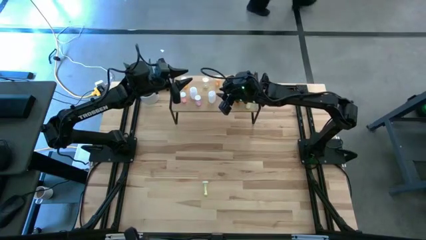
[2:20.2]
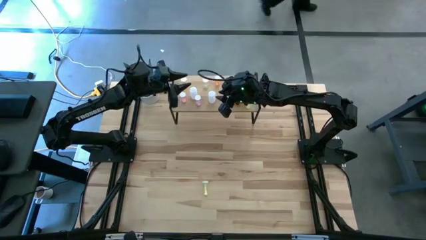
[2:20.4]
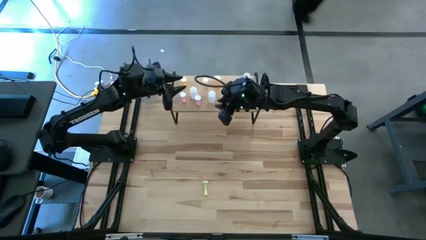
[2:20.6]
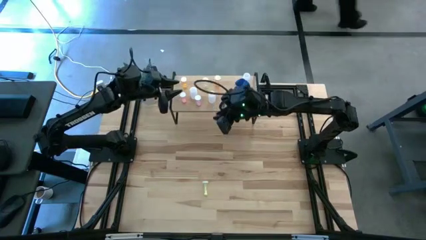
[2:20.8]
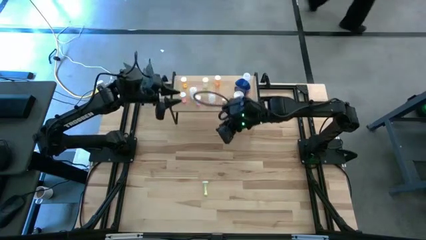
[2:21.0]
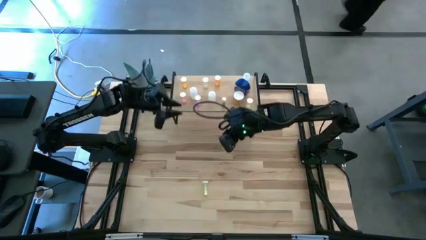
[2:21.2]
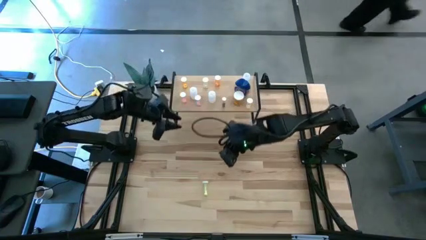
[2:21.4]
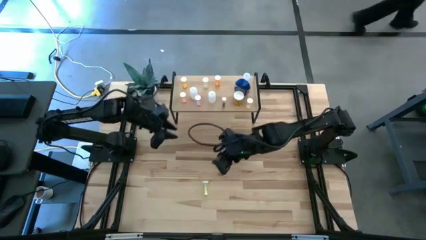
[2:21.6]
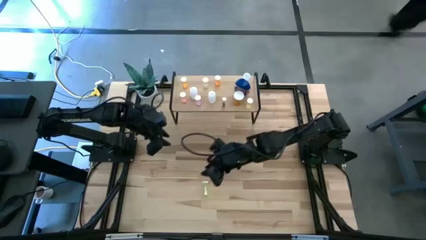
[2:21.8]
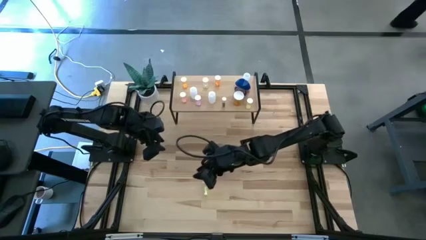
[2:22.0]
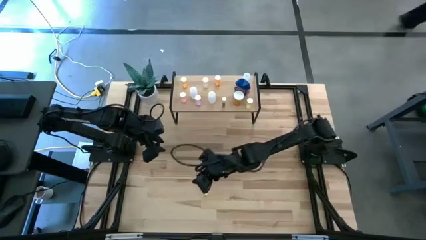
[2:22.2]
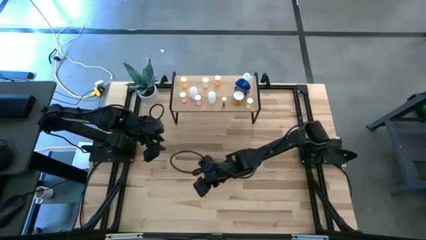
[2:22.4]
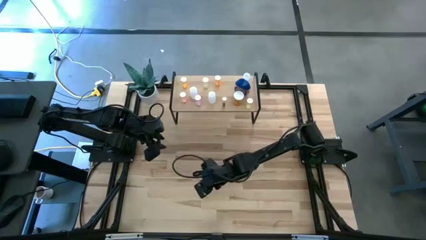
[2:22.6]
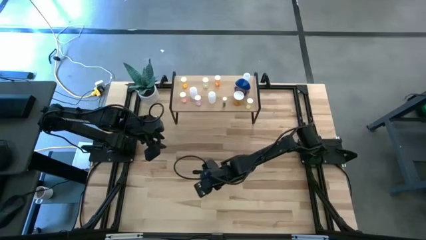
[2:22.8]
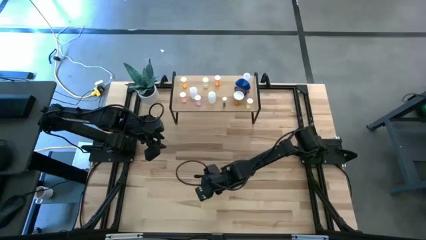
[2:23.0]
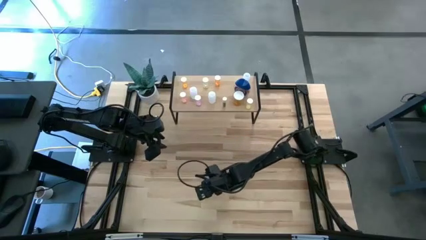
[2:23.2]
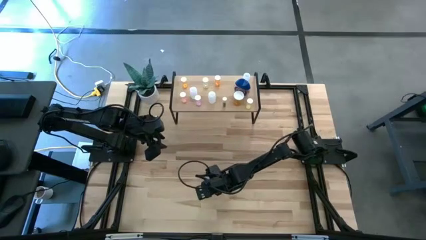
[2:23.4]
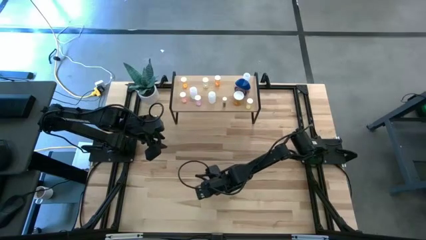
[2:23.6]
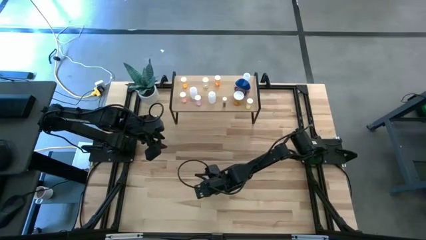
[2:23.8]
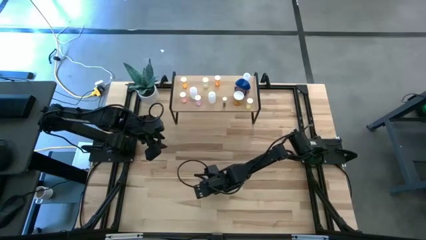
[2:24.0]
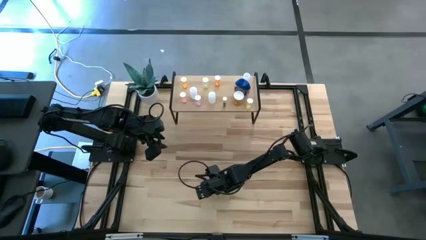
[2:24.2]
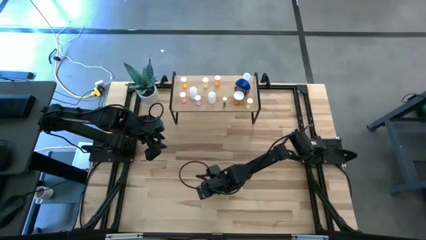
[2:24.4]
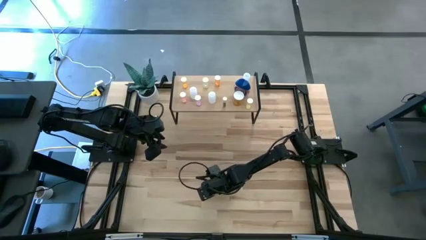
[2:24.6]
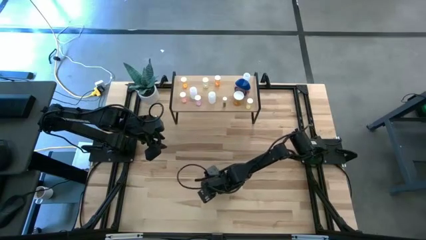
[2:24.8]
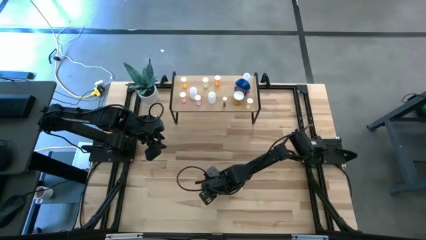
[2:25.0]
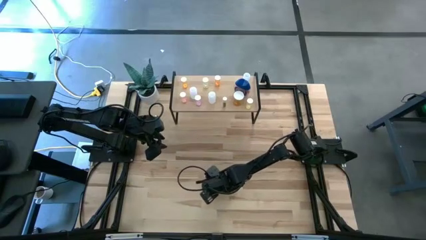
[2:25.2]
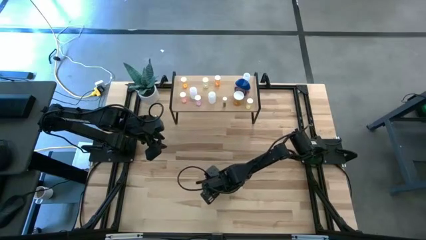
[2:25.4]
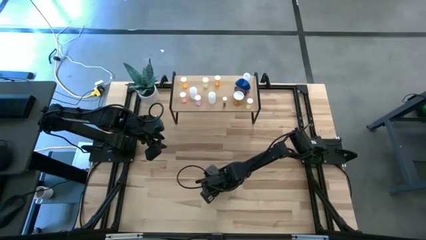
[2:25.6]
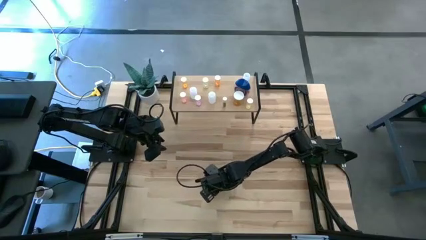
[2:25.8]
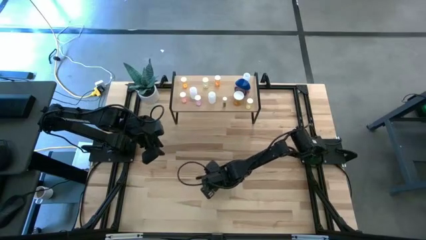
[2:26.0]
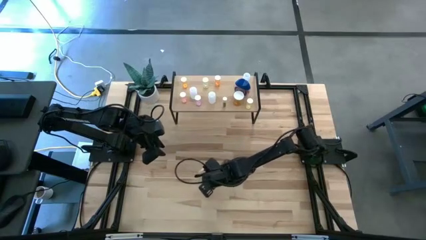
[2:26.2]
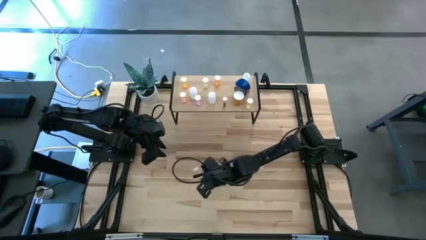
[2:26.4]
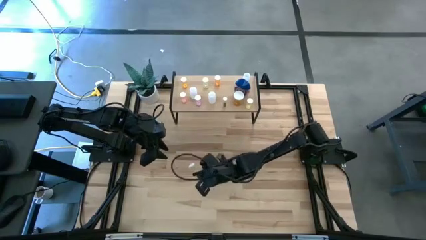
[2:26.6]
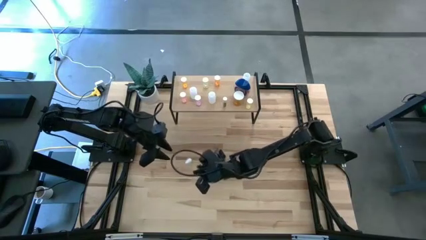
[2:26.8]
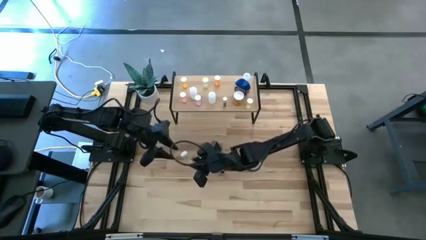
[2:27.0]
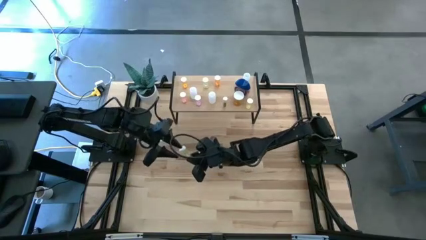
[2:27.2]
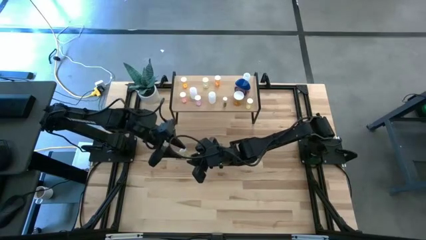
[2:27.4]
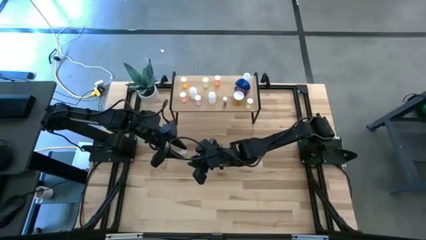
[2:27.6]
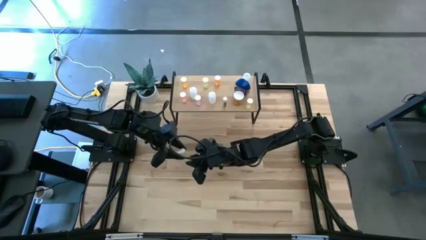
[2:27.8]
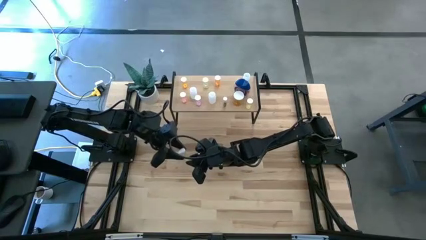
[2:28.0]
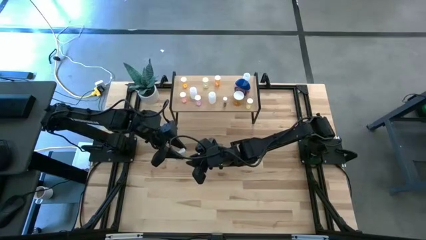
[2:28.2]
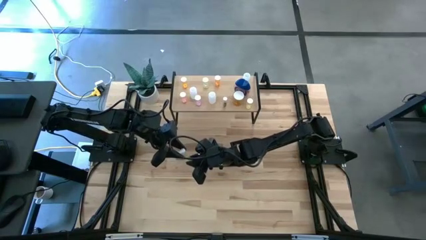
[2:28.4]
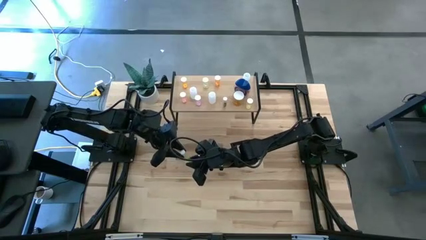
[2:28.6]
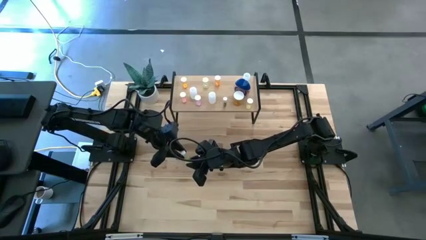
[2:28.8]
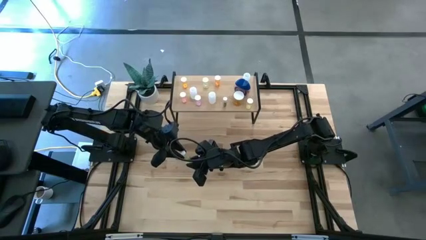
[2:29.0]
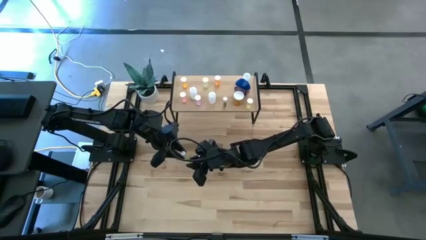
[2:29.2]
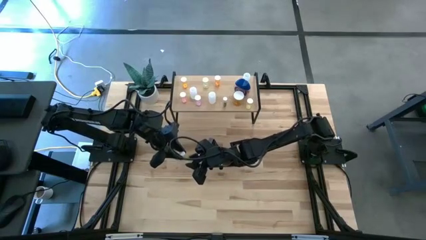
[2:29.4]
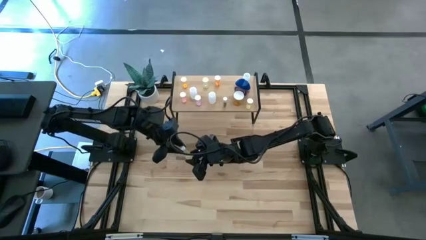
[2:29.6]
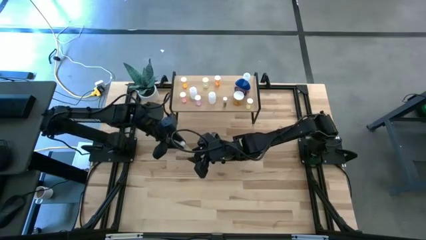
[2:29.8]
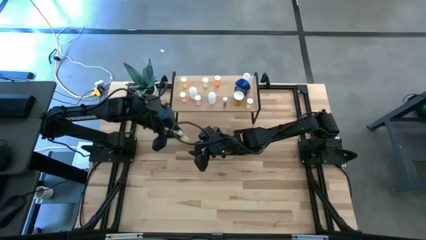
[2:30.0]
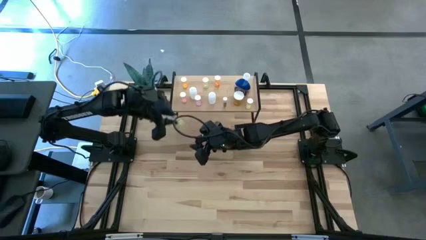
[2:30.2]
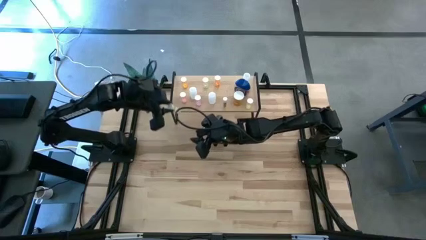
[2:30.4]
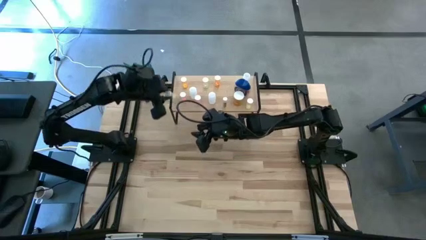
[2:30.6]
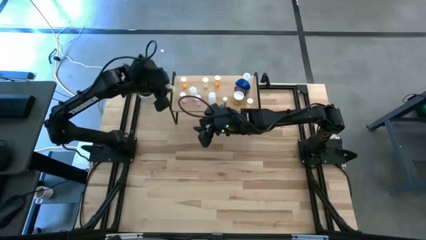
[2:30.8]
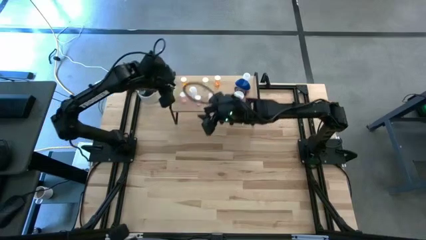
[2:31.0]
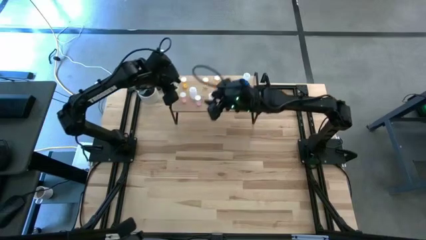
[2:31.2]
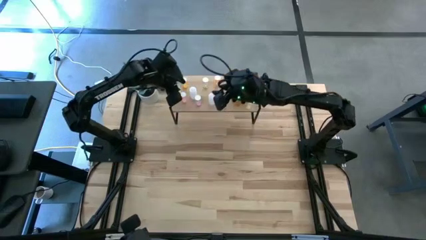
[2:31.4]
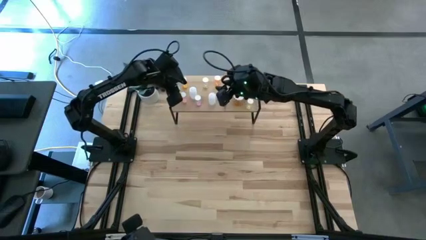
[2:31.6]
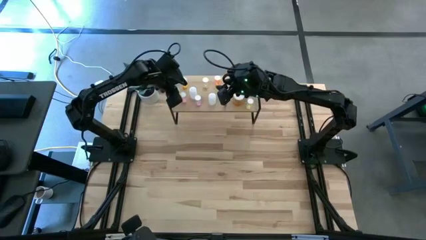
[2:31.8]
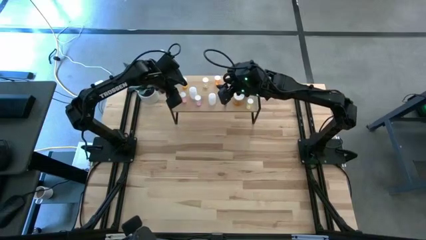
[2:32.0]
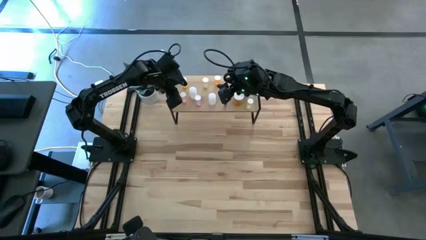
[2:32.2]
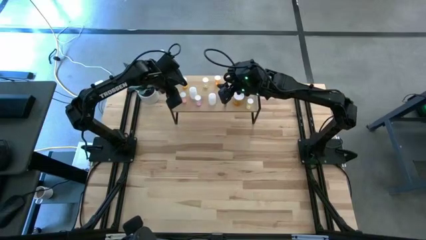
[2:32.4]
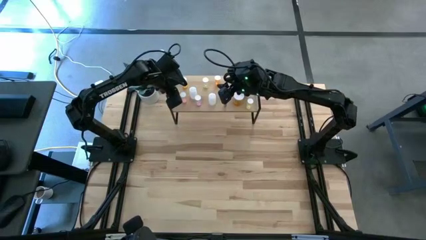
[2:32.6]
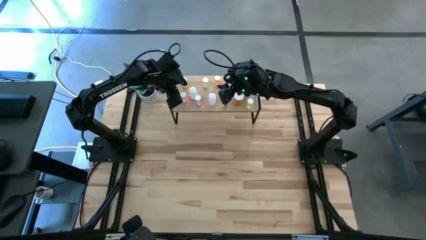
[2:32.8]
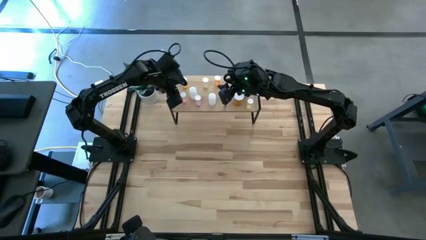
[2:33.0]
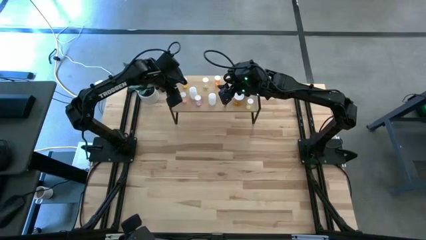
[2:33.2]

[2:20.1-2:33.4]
Task: Pick and place medicine bottles onto shelf by color
Put the yellow pill bottle on the shelf

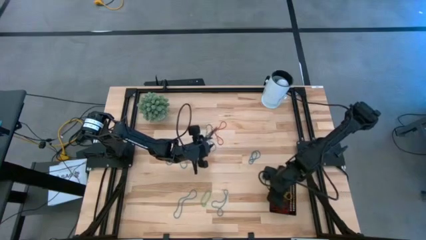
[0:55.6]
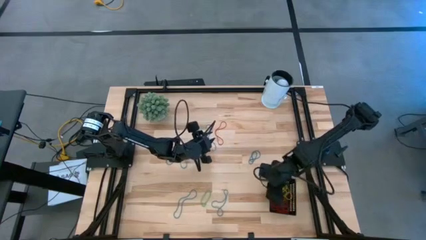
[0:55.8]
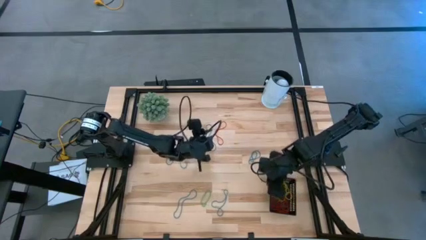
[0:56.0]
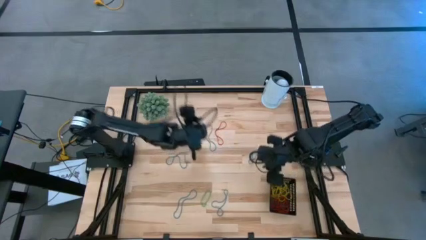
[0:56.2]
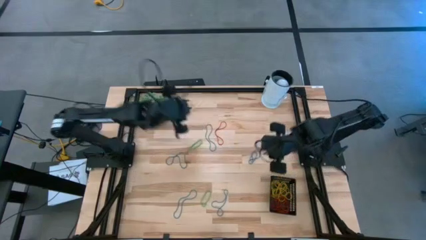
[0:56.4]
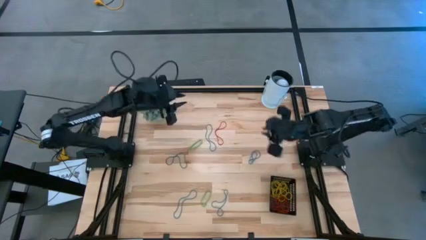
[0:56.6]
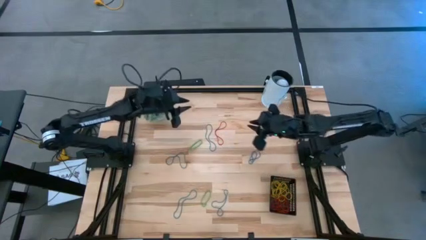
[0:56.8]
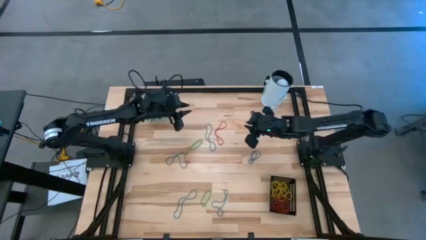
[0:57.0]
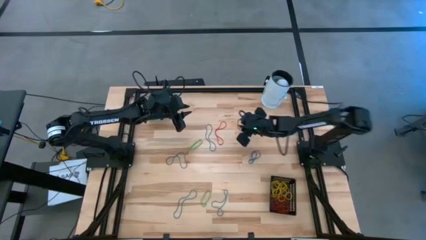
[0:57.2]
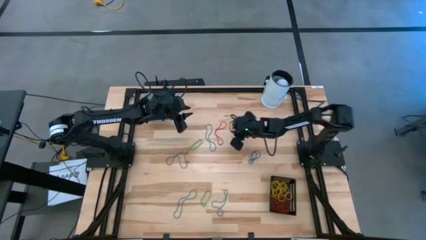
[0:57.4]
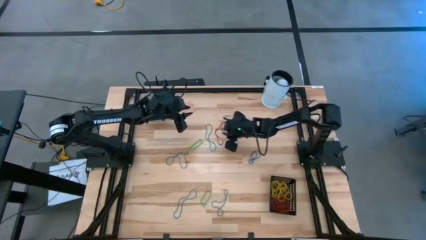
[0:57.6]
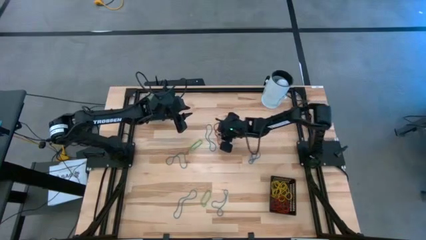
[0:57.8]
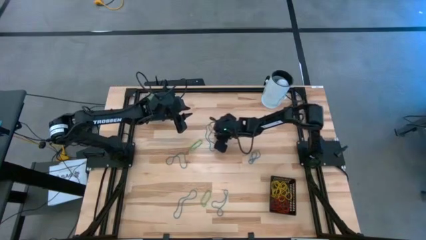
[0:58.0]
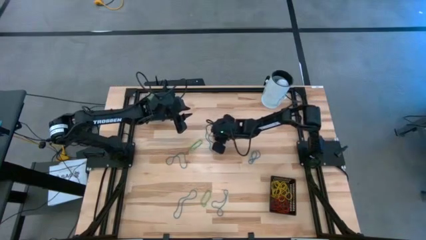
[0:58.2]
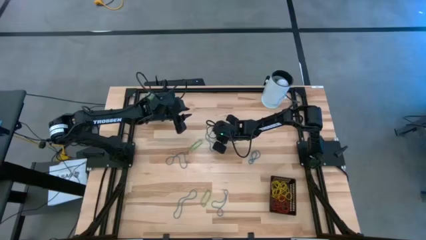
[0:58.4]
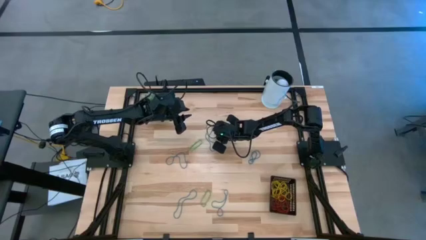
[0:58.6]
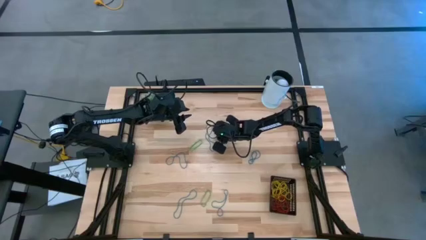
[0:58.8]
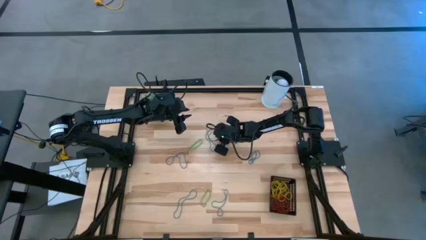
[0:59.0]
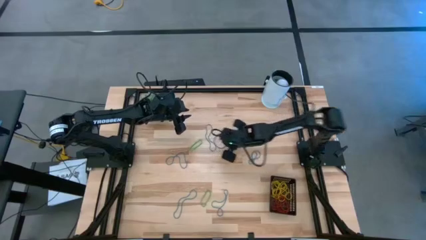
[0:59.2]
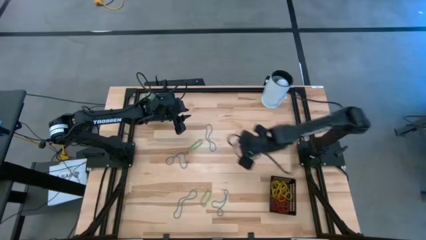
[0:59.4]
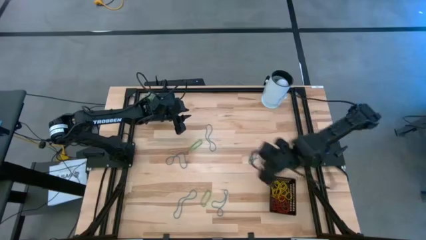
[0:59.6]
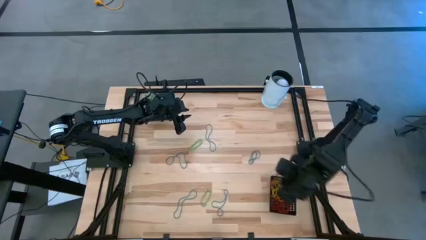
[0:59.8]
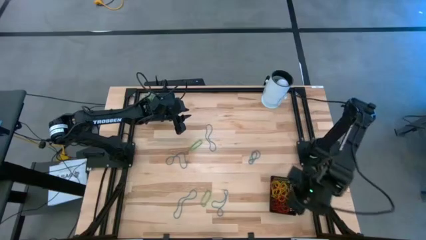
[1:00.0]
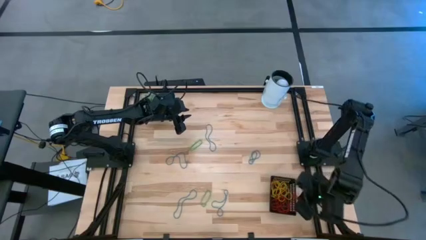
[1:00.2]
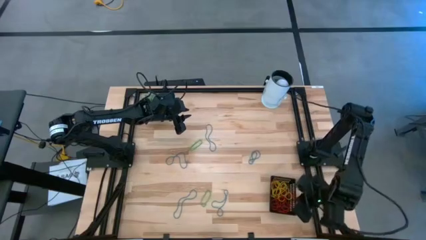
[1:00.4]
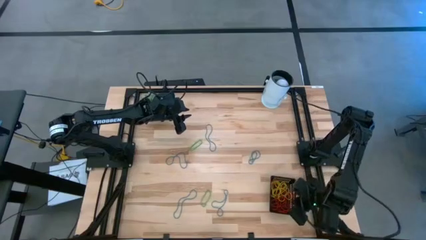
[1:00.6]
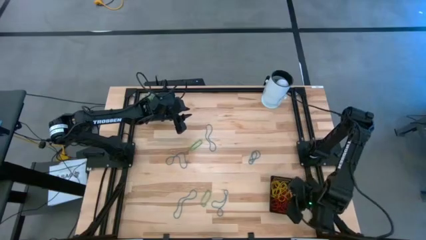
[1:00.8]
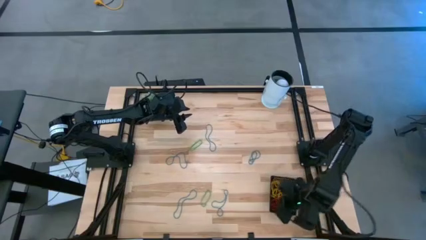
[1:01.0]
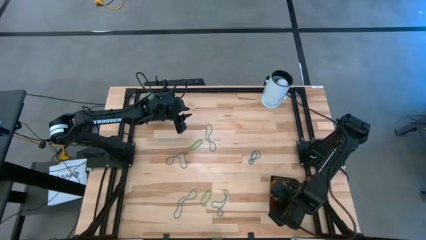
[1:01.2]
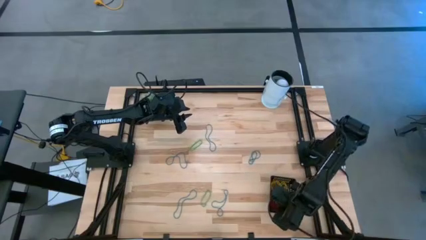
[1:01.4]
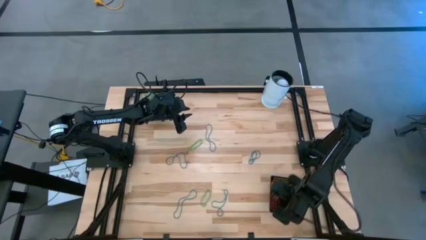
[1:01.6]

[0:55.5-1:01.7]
Task: Pick and place items into bin
Put the red rubberband into the black basket
